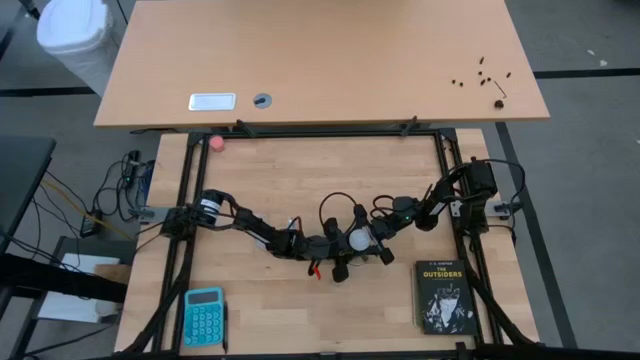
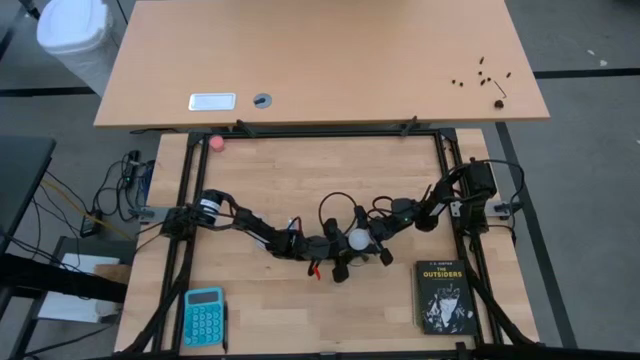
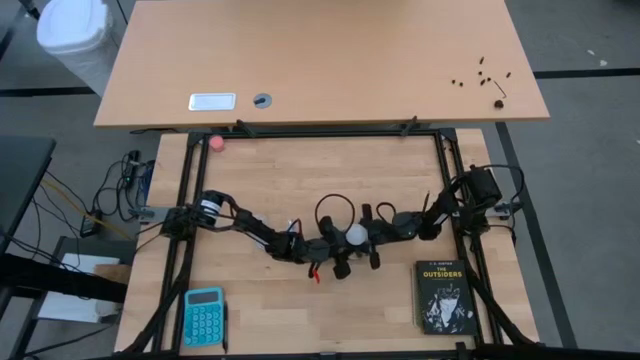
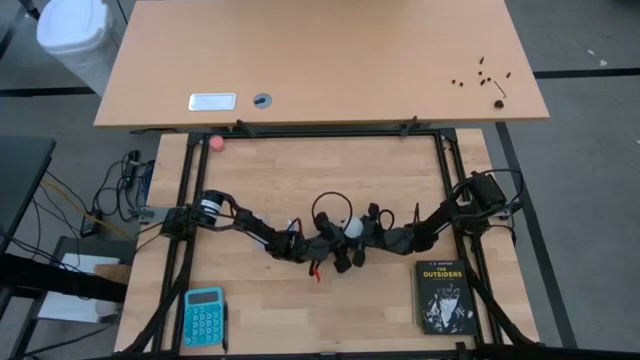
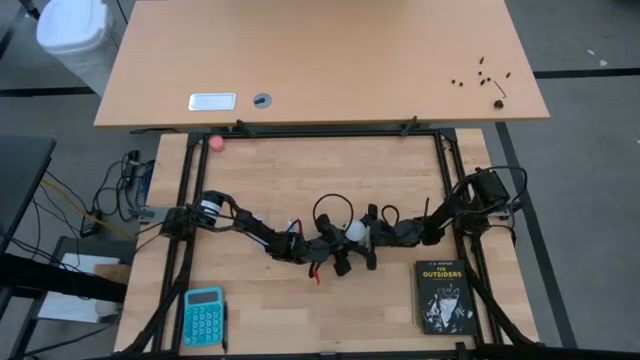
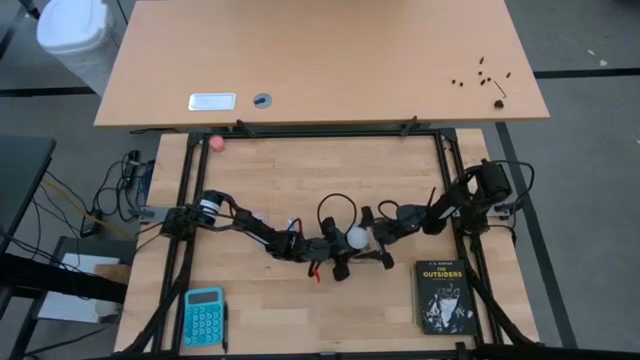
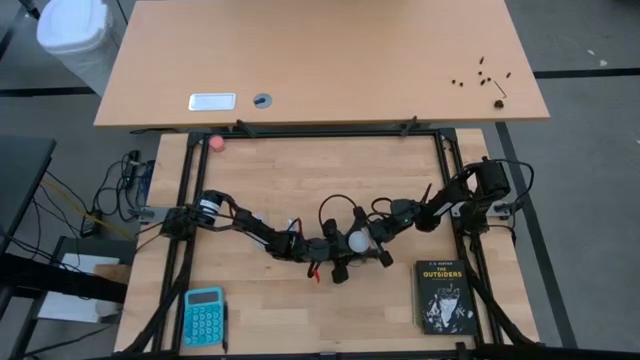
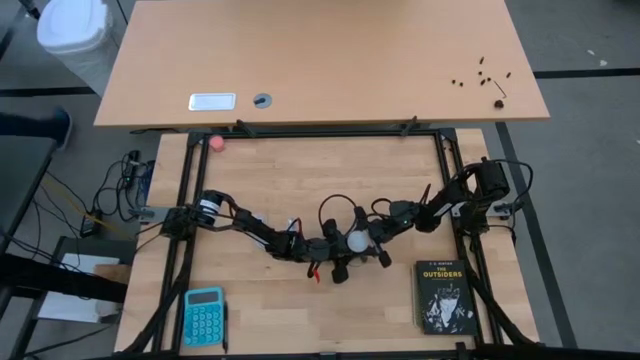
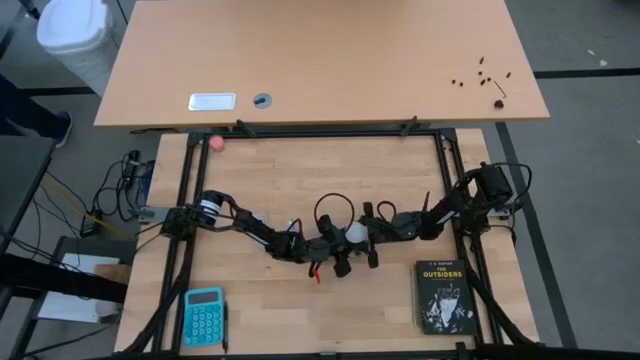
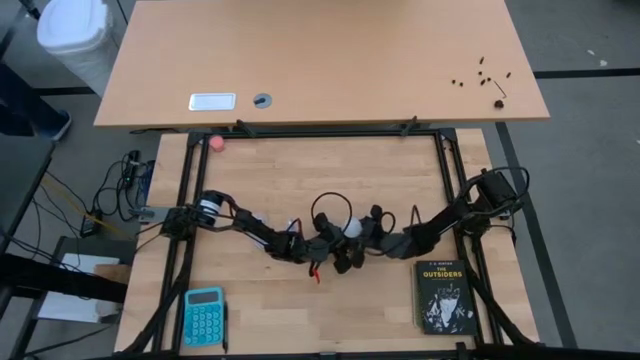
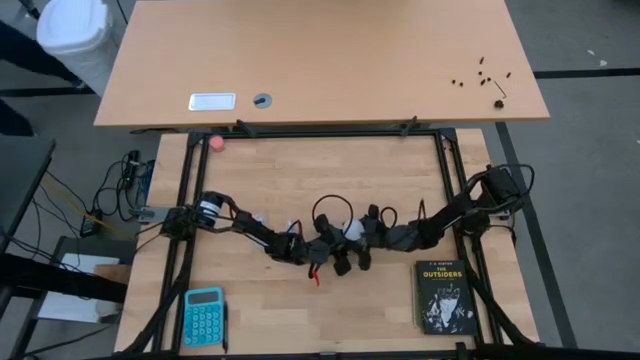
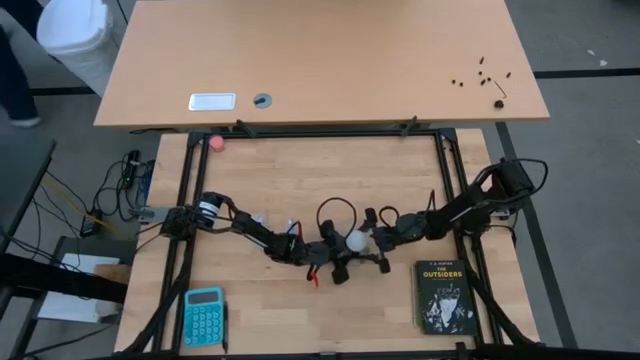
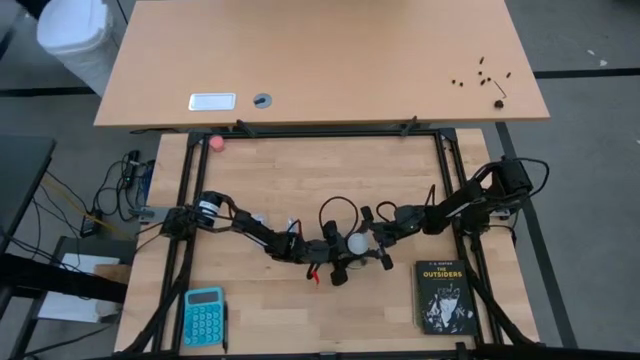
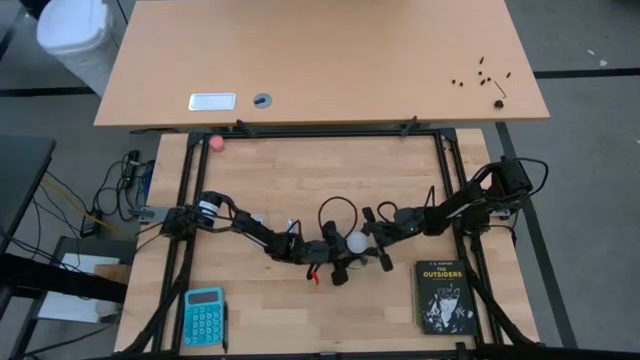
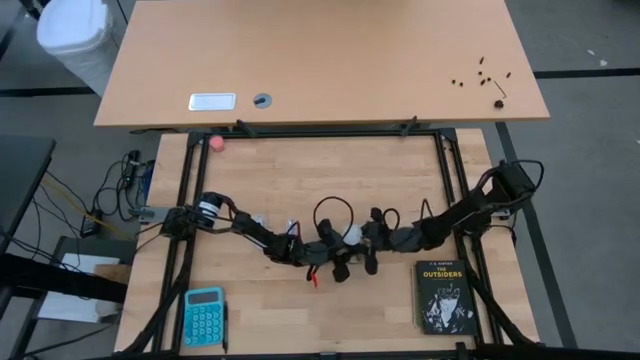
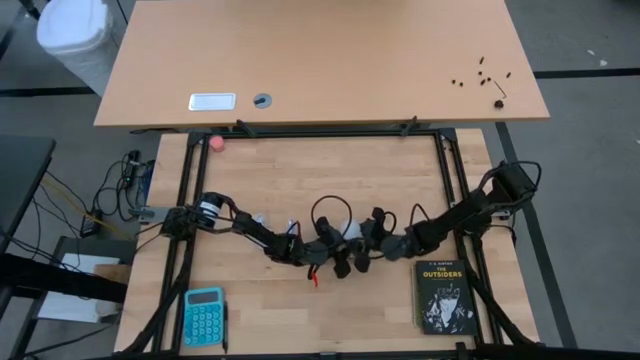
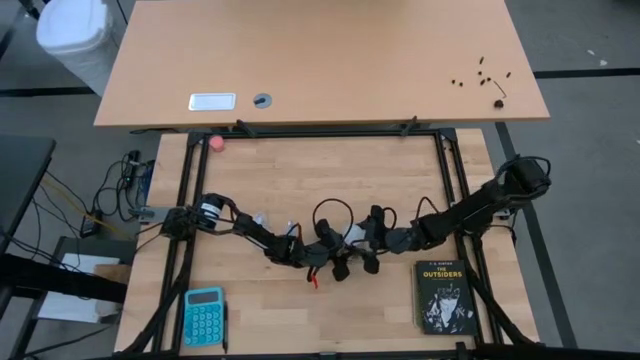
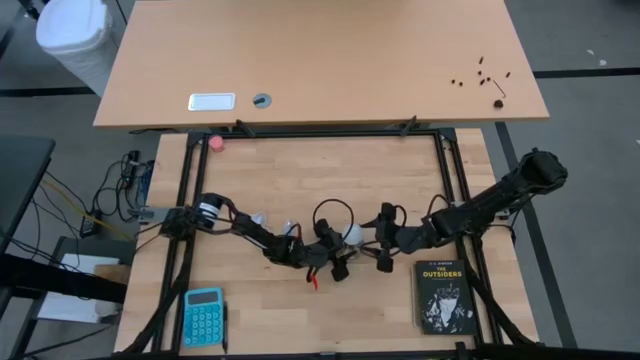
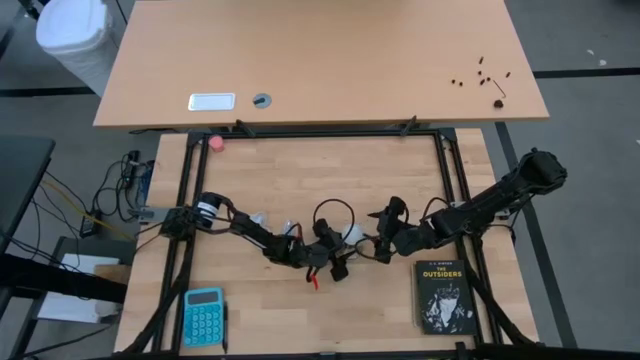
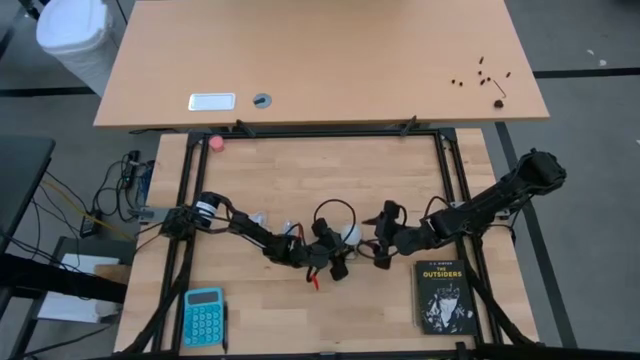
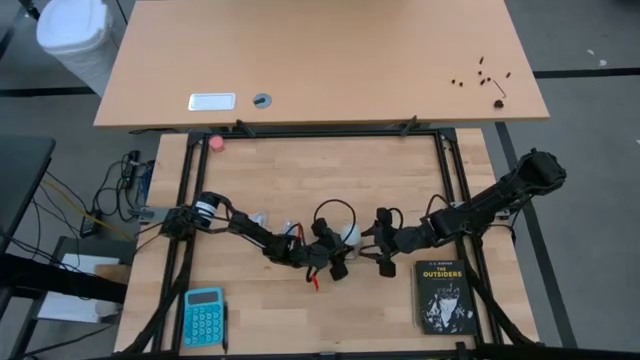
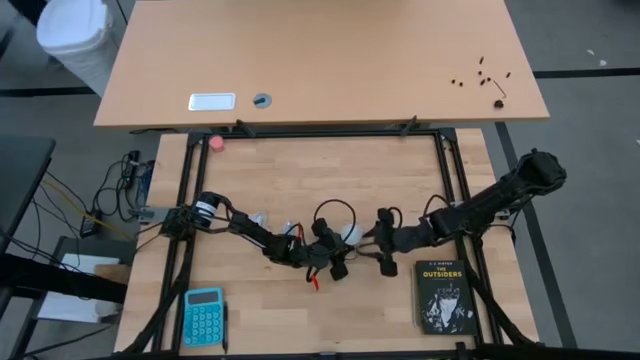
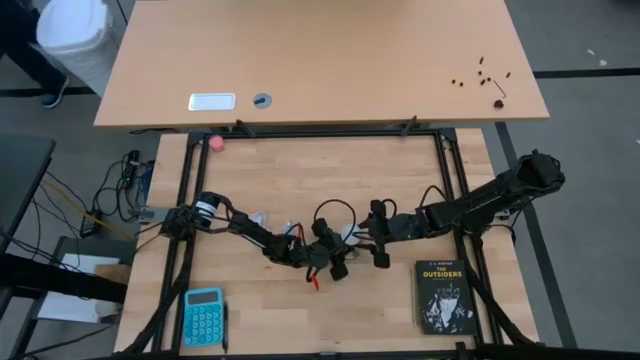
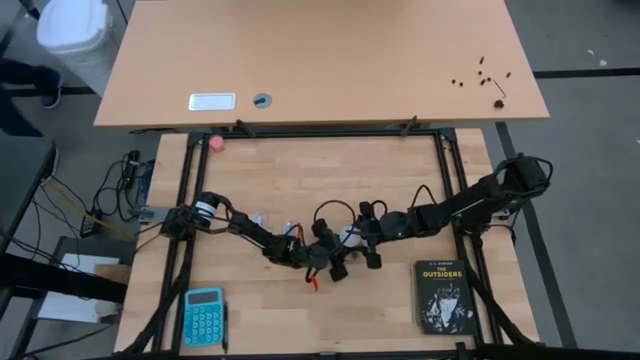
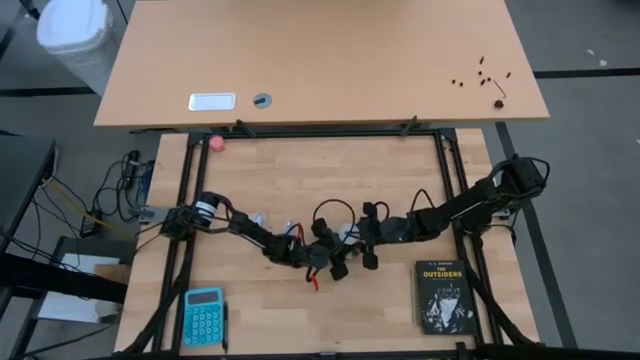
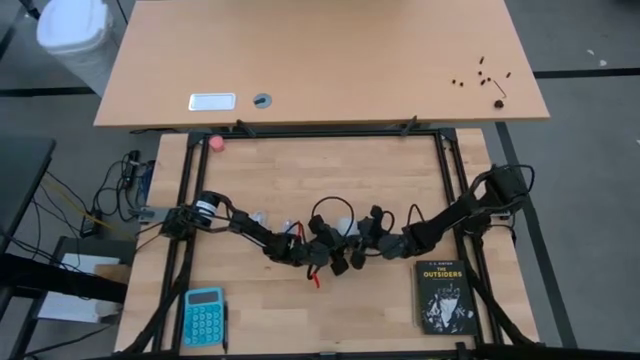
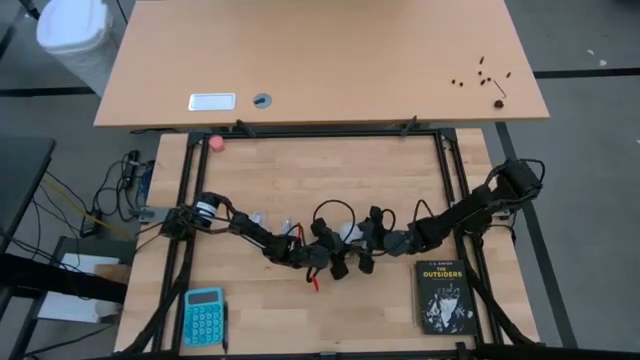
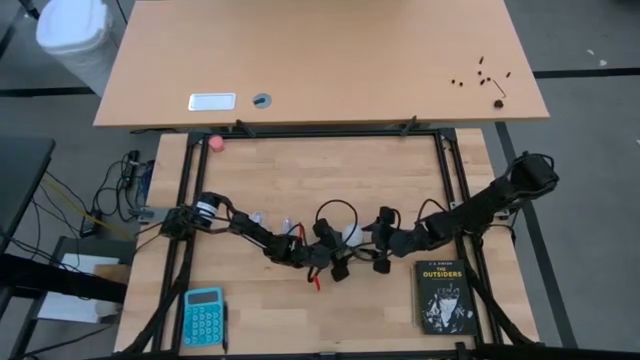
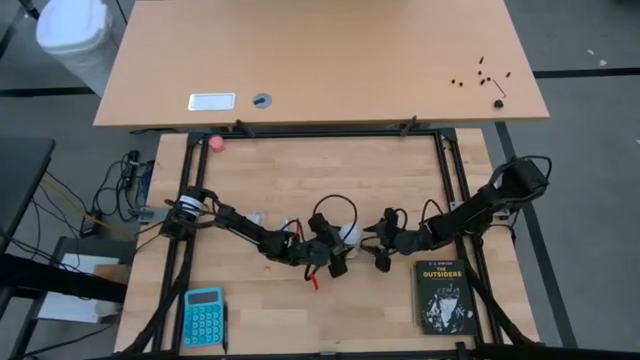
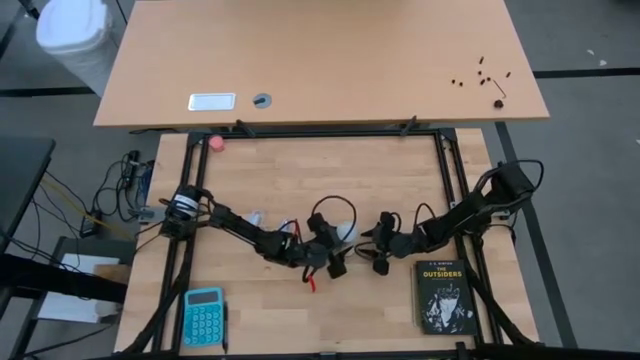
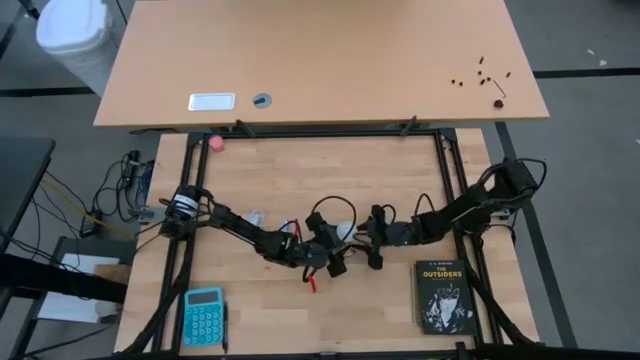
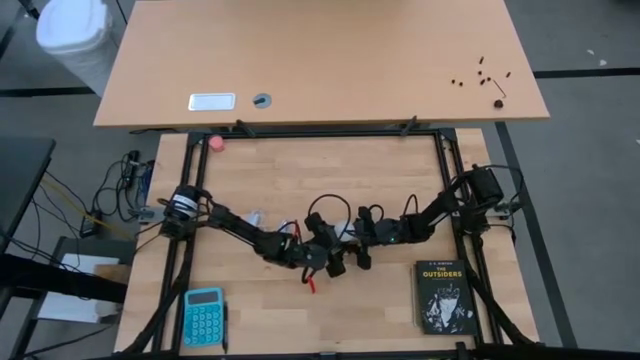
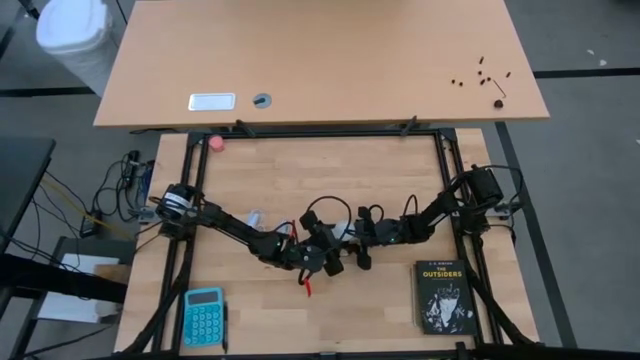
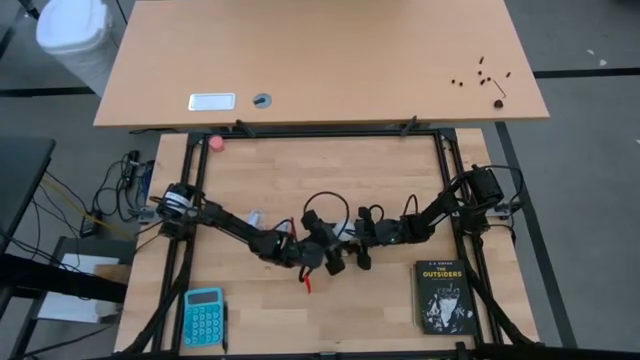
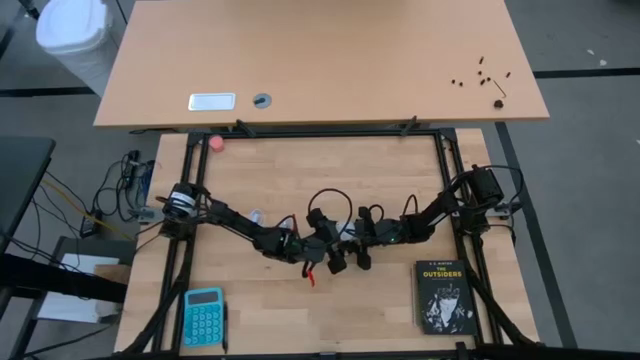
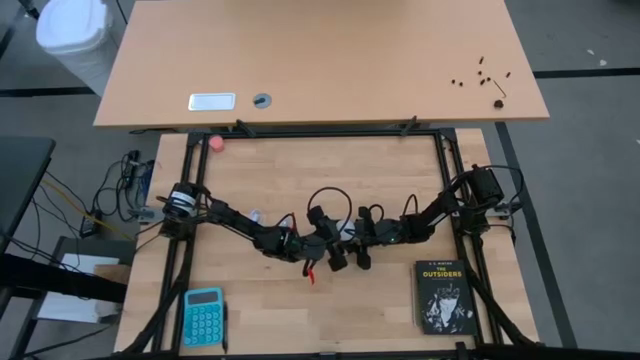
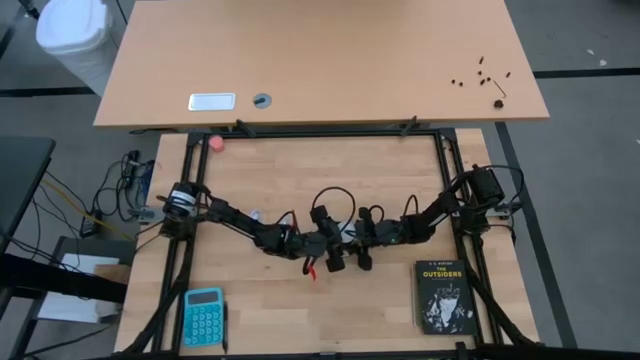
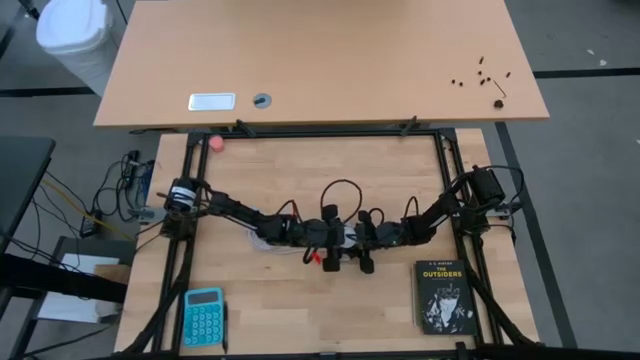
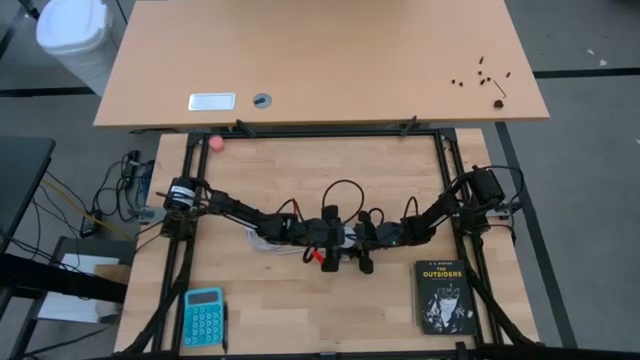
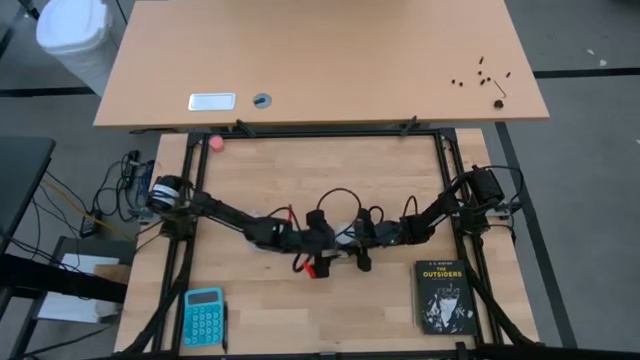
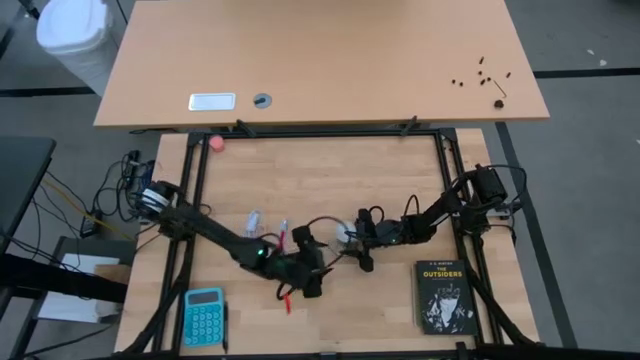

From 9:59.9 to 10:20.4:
Task: Screw lightbulb
Insert the white lightbulb into the silver lamp
